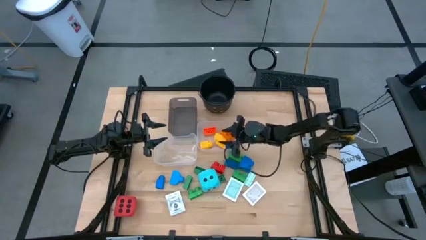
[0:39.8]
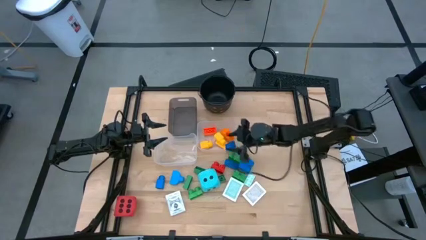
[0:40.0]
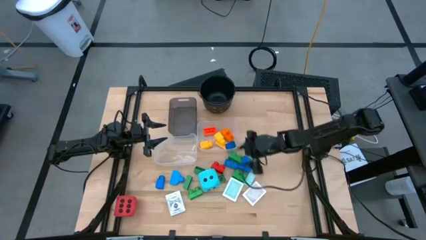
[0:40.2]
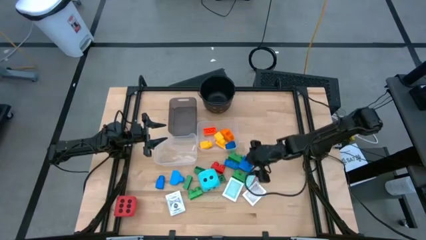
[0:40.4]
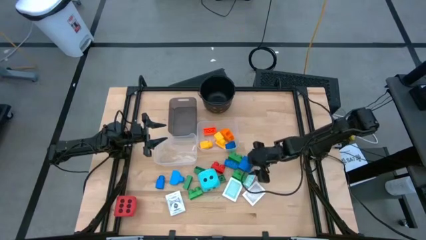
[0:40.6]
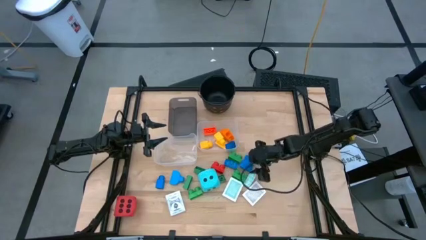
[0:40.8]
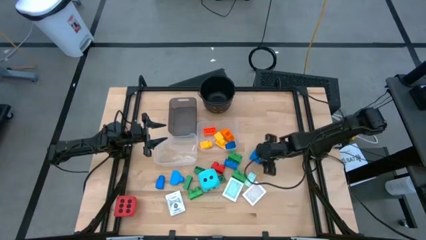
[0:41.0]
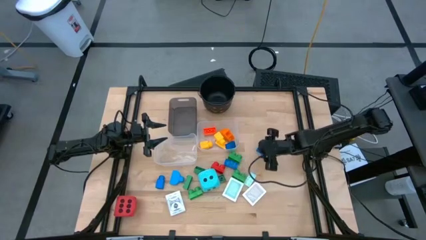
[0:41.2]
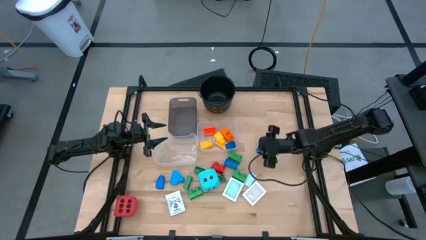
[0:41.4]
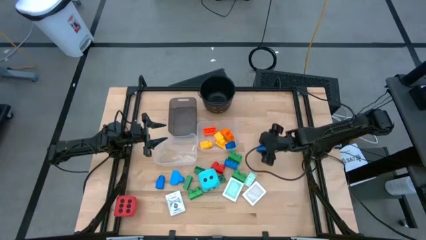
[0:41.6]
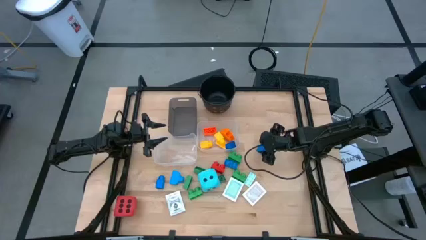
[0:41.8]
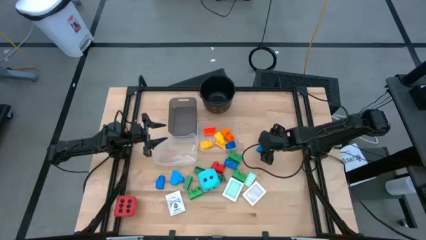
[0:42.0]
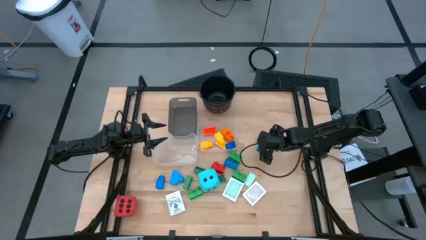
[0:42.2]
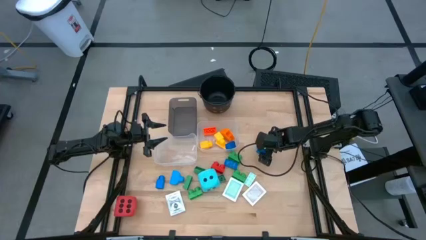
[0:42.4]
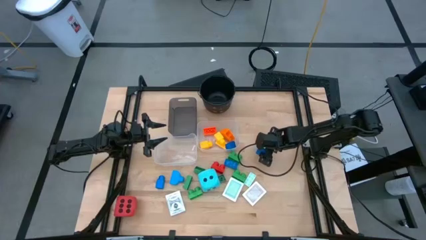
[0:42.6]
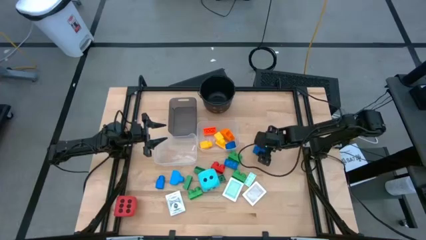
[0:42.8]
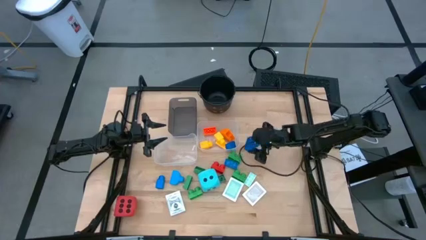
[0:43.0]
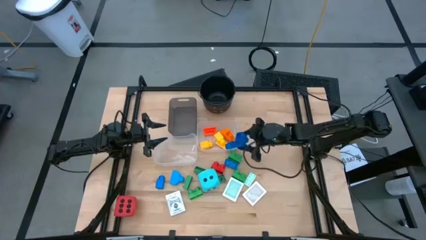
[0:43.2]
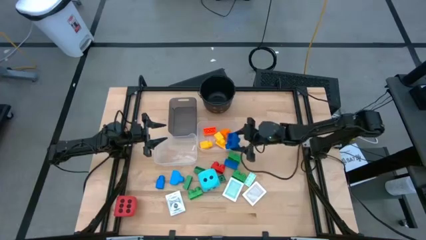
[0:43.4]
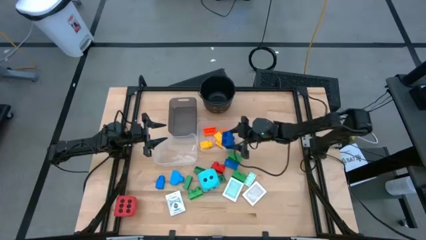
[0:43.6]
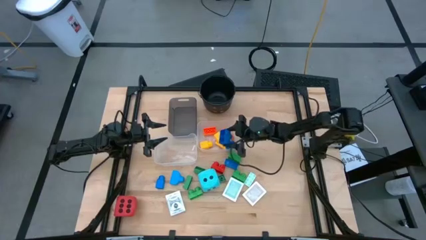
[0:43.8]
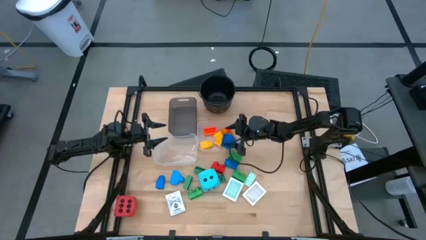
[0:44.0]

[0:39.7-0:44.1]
Task: Pick & Place Toys
Put the blue game piece into the right transparent bin

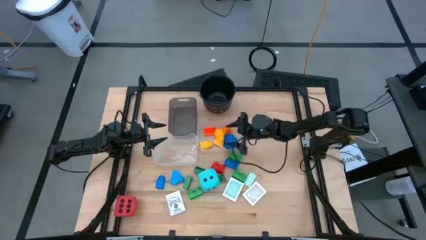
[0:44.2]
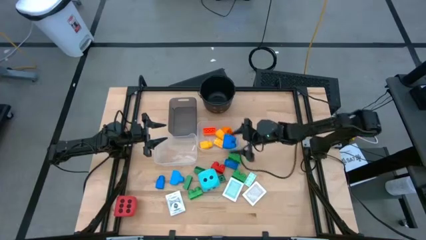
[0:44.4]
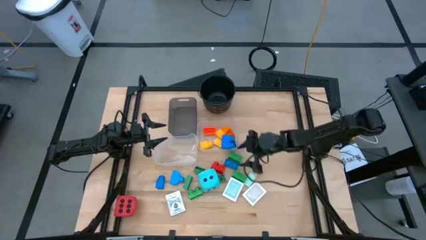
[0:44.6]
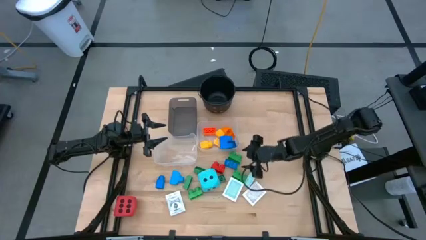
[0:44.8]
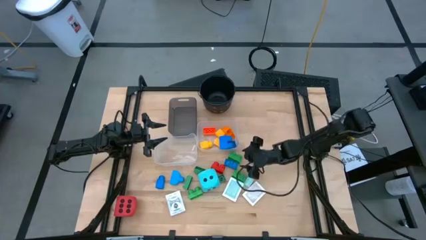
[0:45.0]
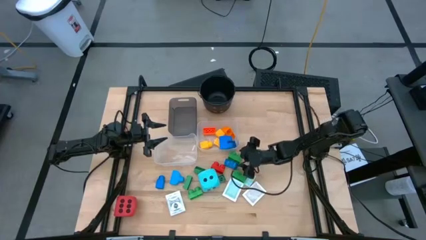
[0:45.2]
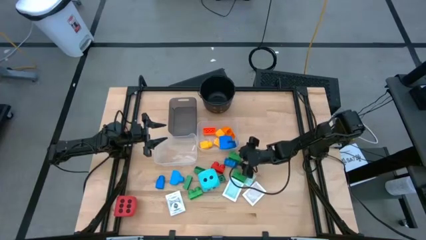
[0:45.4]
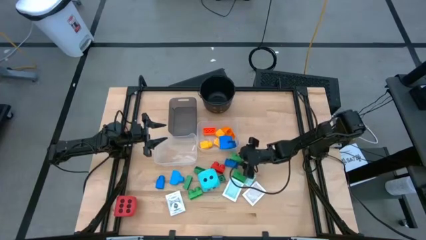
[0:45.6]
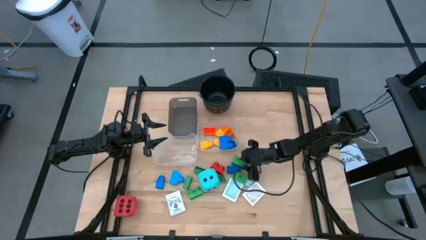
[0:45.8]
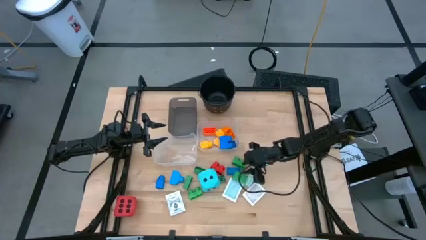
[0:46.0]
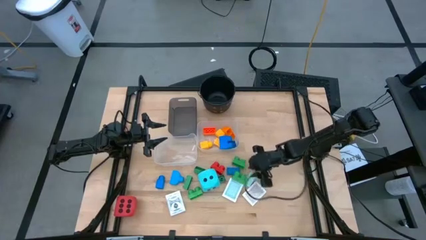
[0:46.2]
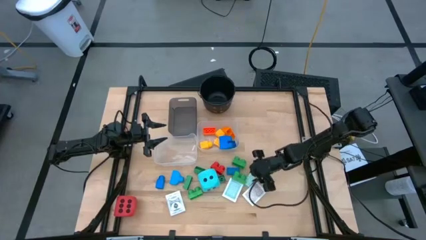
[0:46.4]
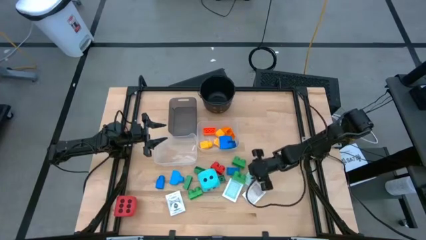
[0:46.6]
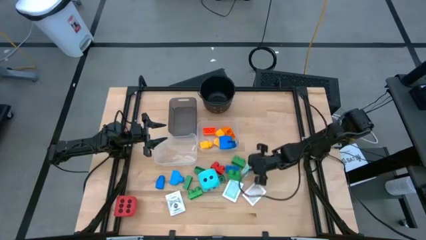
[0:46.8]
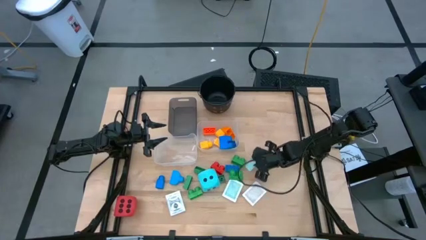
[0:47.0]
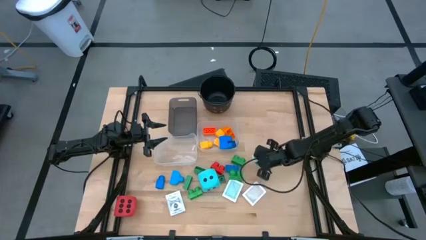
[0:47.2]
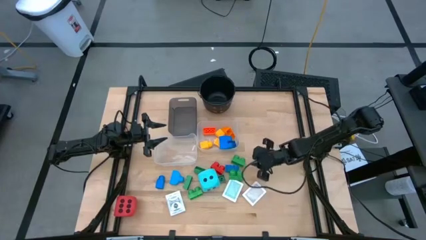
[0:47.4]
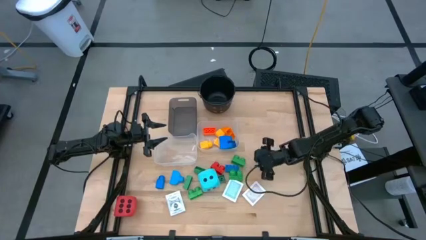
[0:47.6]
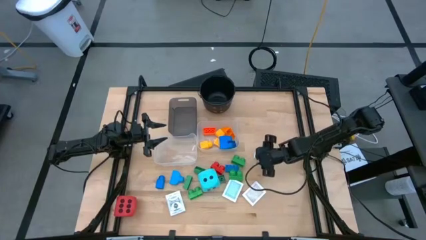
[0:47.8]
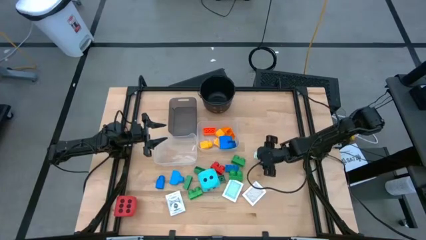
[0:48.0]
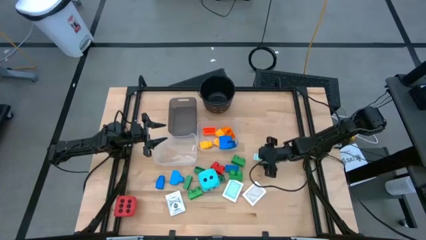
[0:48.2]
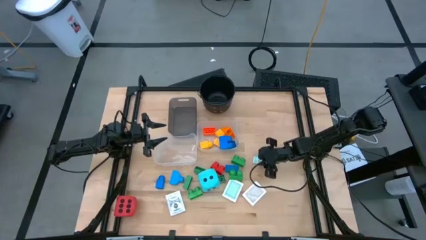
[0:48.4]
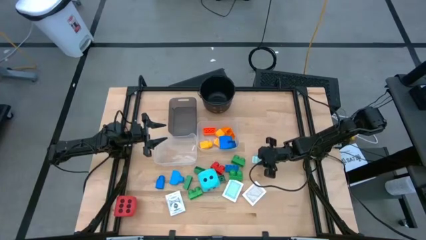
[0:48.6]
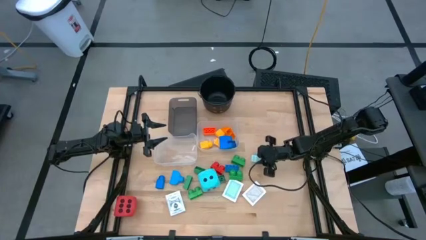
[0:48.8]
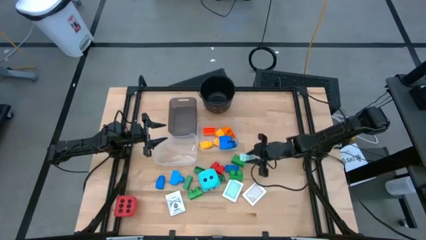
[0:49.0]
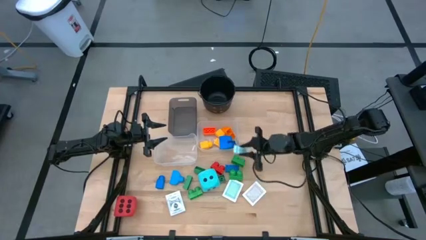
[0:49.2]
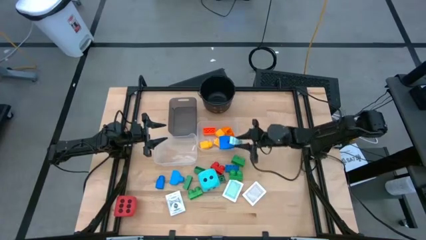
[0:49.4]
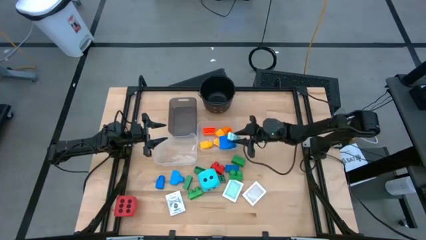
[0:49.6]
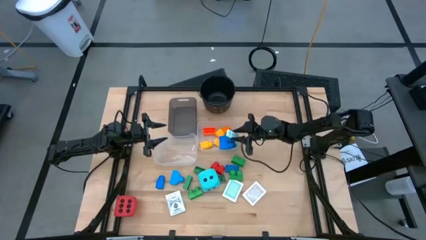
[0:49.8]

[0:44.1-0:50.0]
Put the light blue game piece into the right transparent bin

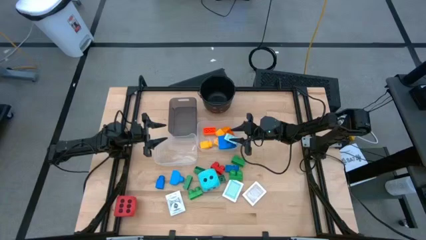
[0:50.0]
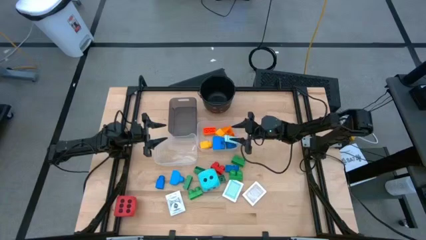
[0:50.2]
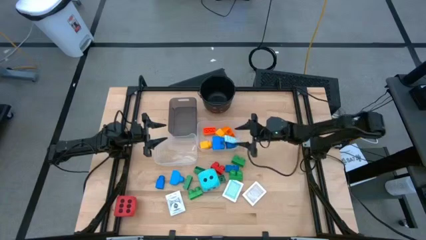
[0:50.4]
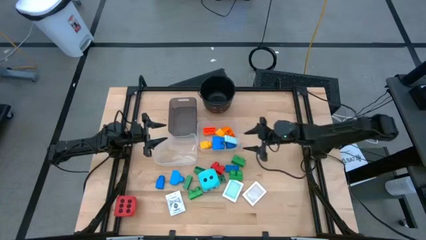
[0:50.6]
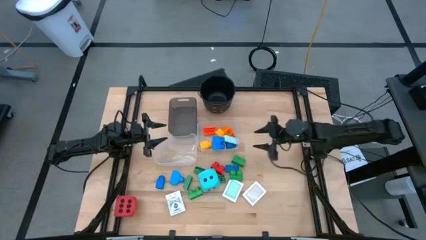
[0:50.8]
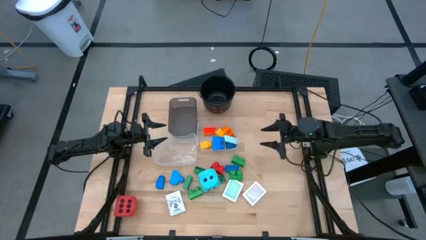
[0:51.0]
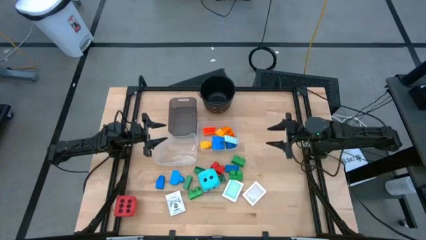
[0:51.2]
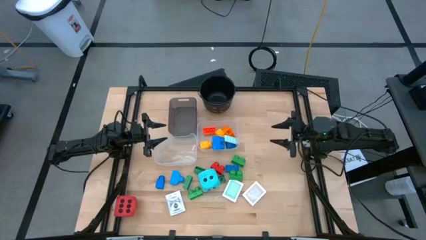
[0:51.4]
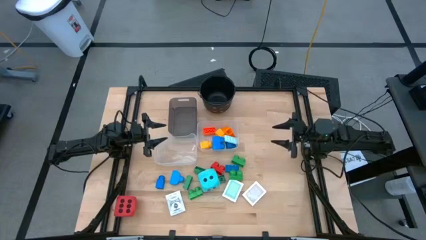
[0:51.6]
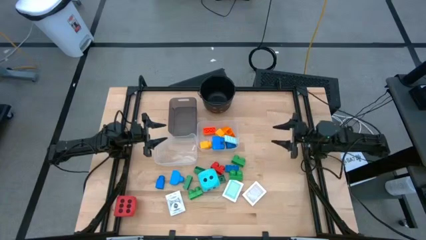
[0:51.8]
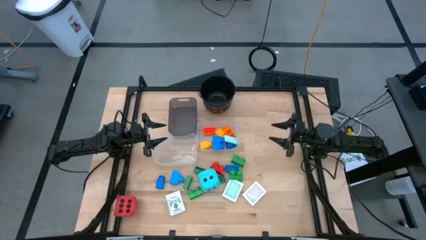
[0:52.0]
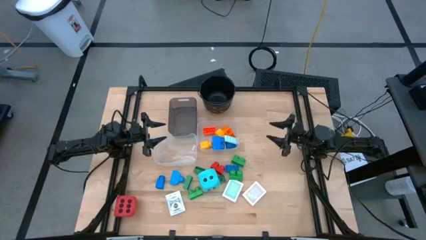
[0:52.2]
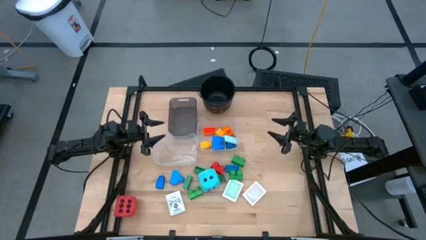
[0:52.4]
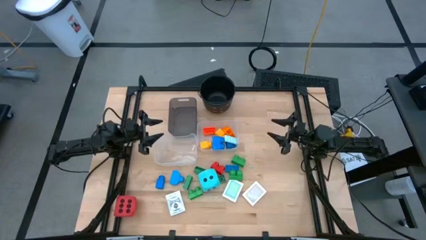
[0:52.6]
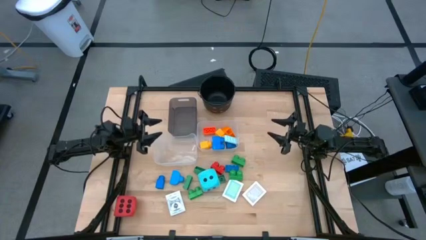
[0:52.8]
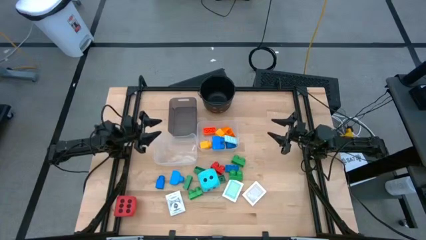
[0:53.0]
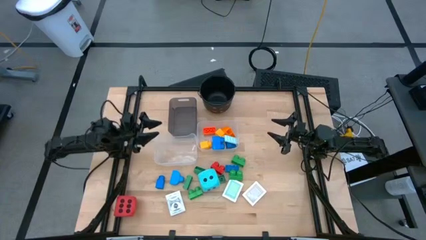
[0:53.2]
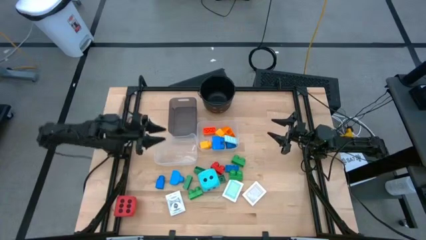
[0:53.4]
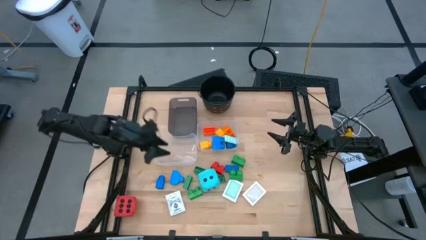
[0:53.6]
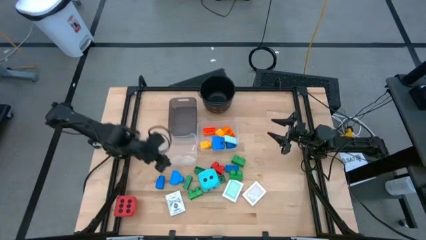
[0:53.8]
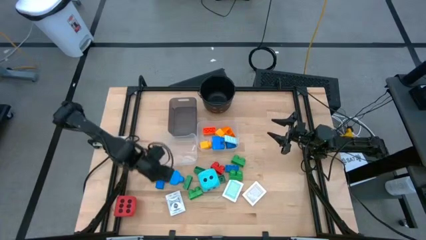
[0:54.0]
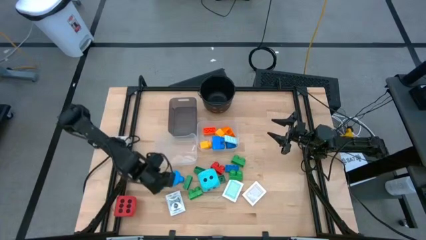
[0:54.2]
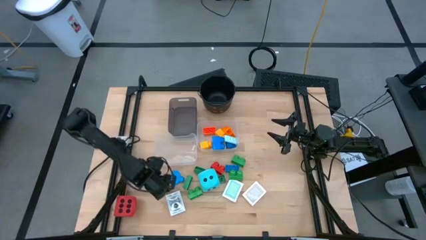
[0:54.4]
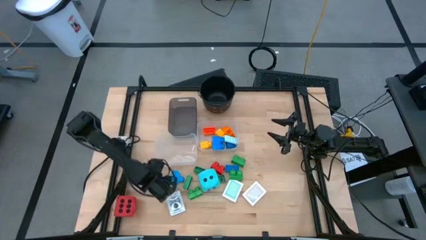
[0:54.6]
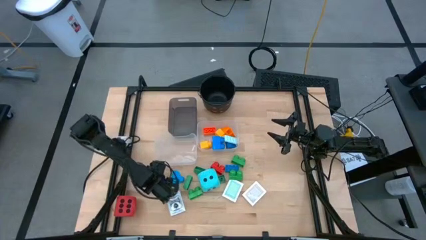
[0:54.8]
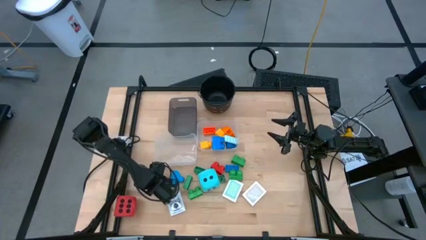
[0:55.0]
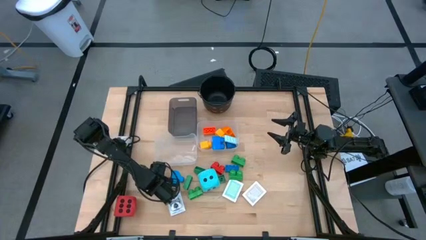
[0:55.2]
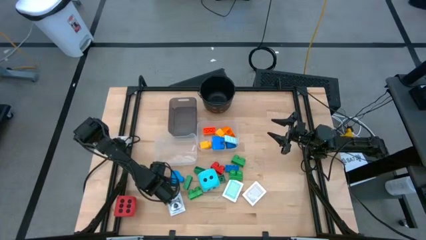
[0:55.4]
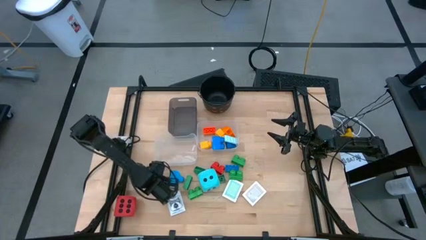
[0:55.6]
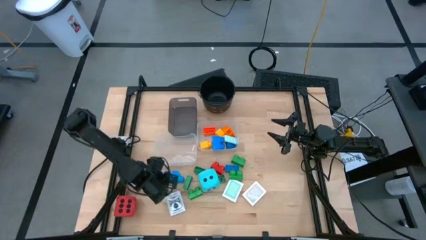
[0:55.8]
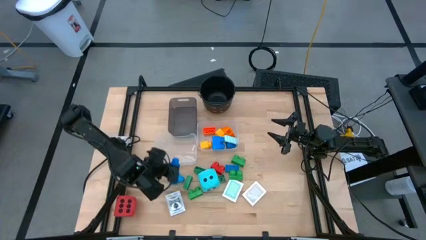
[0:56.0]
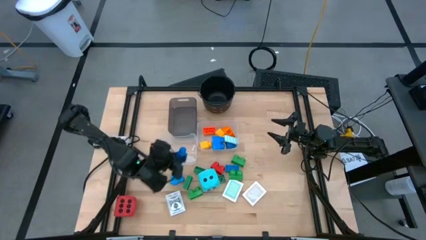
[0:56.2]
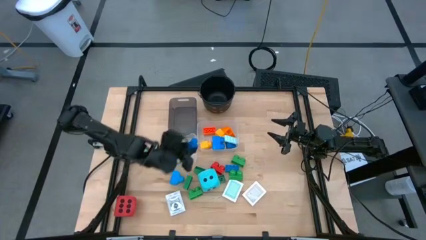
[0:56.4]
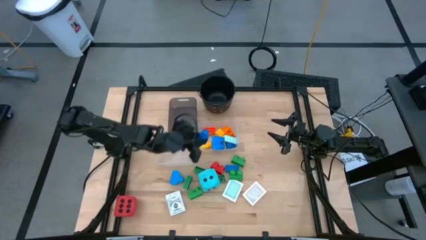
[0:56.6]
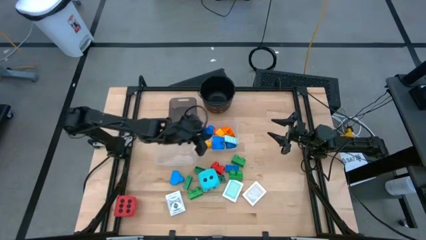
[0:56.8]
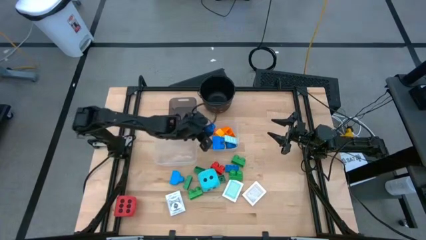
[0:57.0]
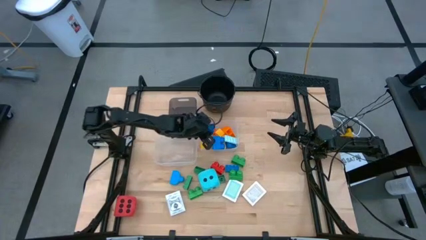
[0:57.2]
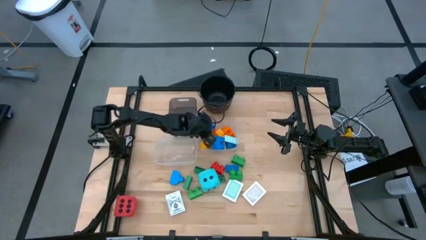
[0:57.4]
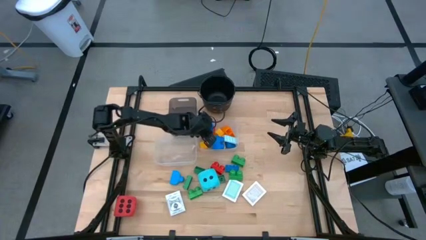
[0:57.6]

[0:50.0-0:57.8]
Put the blue game piece into the right transparent bin
